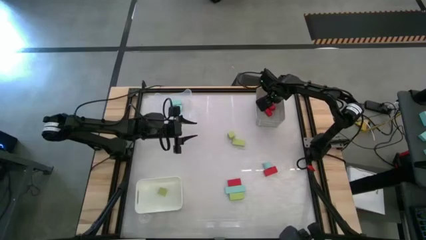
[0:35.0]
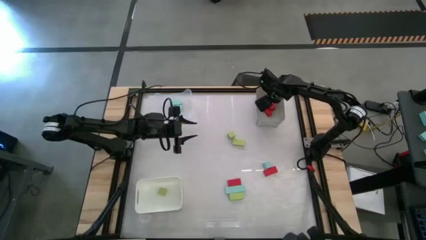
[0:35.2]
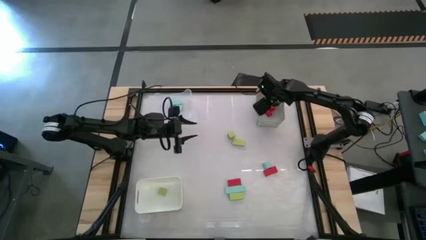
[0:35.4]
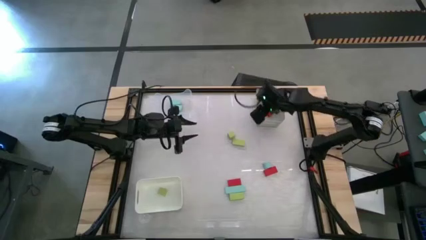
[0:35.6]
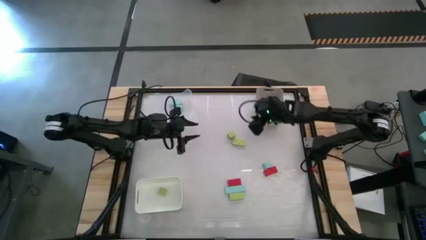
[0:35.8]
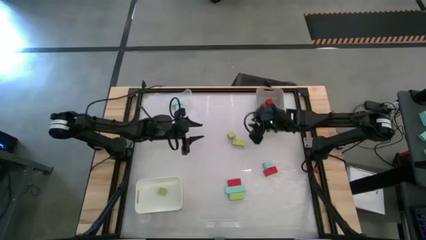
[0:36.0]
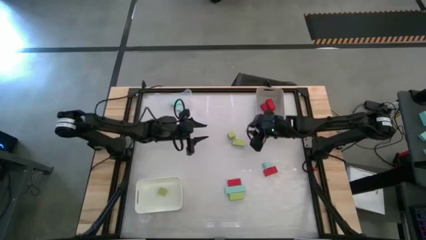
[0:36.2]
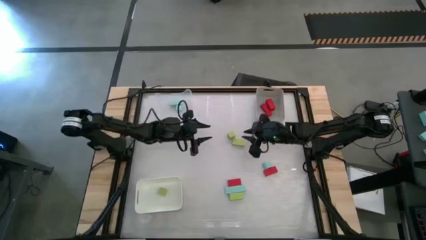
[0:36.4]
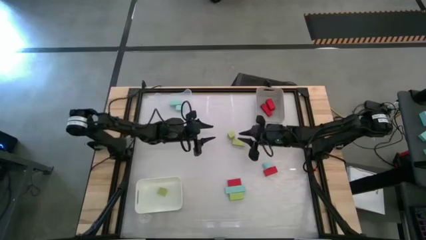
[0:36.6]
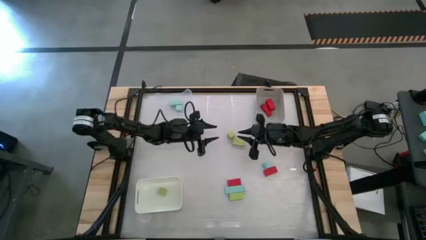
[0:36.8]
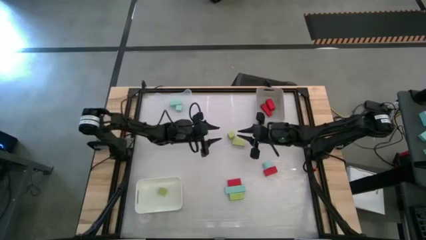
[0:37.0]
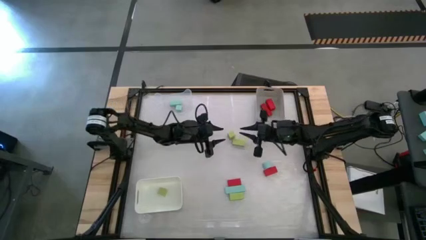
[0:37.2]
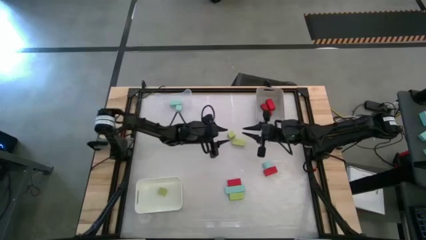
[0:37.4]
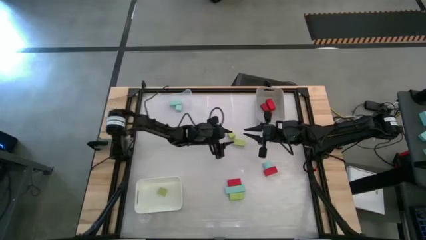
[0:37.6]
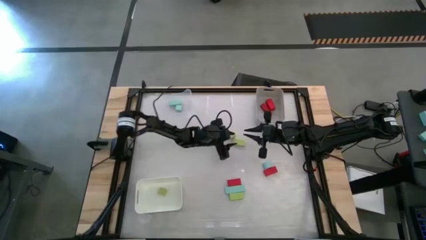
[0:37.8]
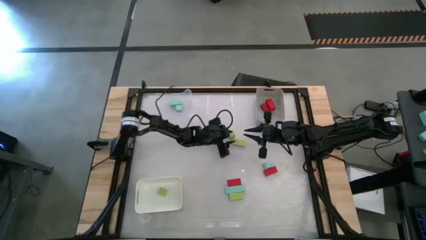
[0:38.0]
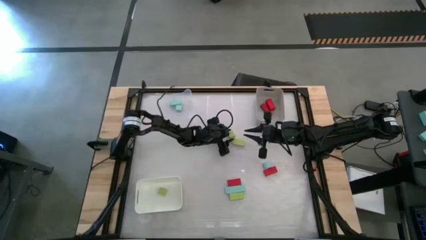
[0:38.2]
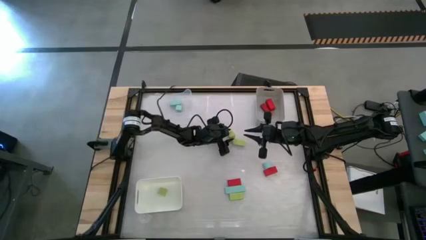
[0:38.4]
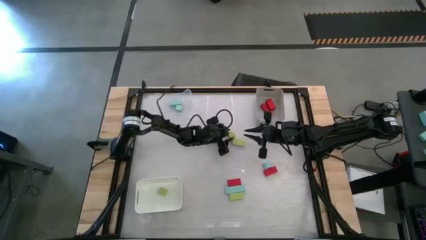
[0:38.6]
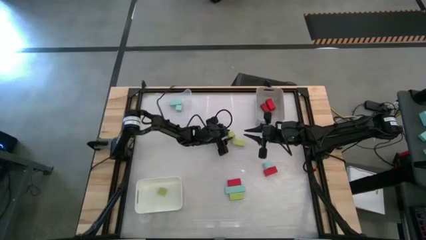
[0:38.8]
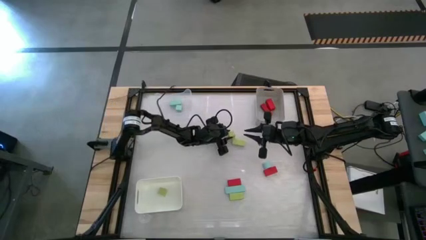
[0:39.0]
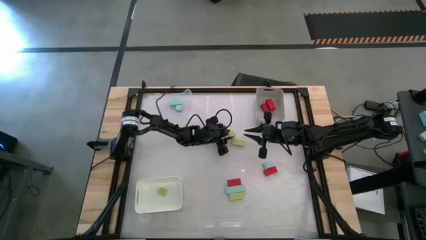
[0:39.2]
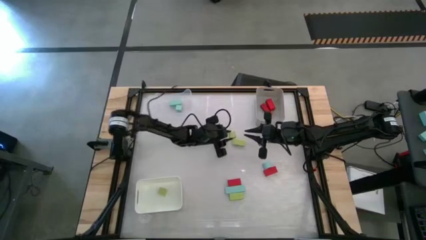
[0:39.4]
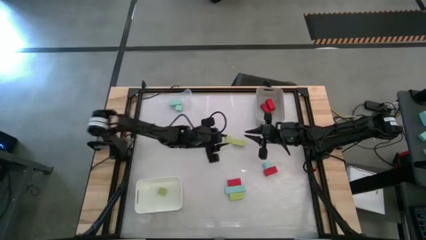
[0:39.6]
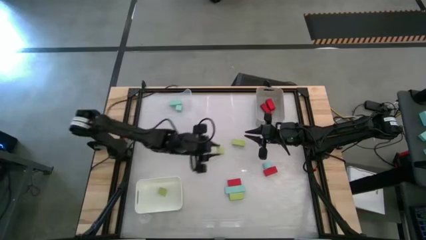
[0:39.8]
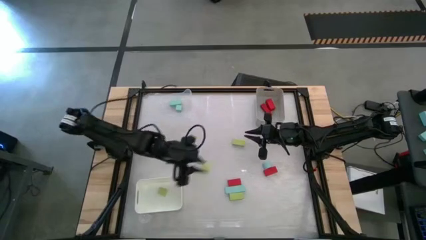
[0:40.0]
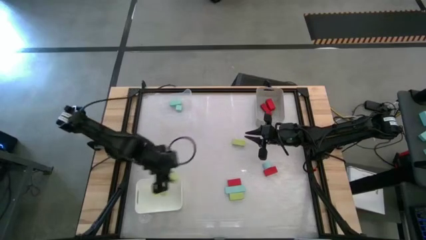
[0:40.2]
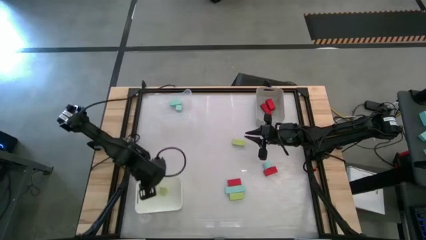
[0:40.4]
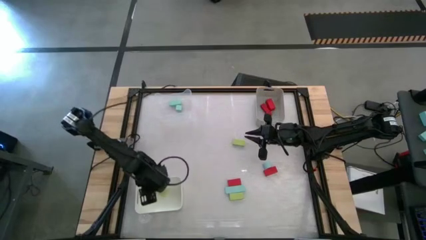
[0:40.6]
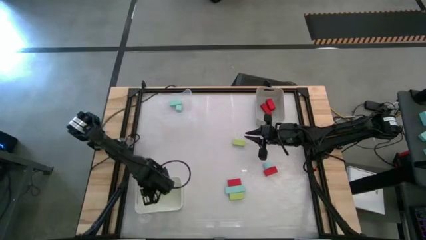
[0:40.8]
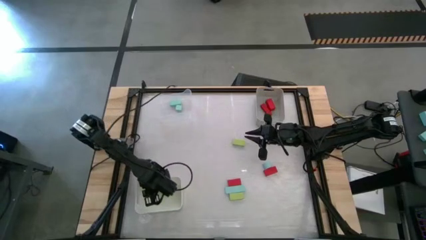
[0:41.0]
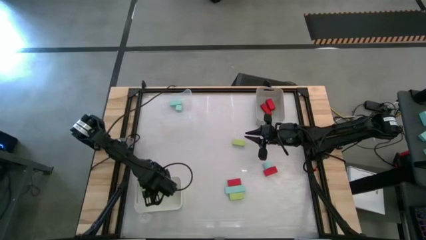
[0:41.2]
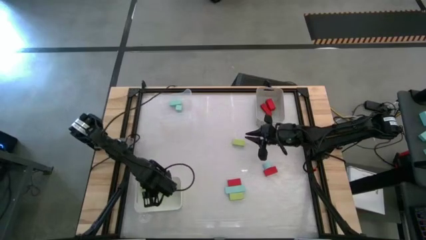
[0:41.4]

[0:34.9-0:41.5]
Task: Sort & place blocks by color
Put the top green block into the white bin

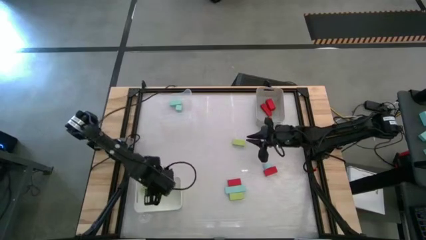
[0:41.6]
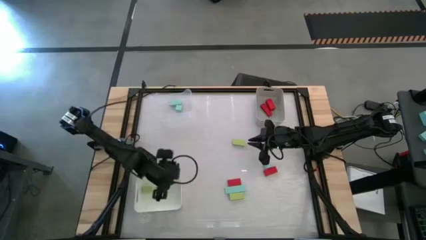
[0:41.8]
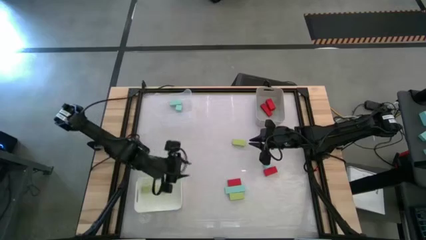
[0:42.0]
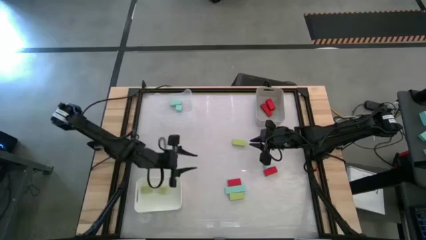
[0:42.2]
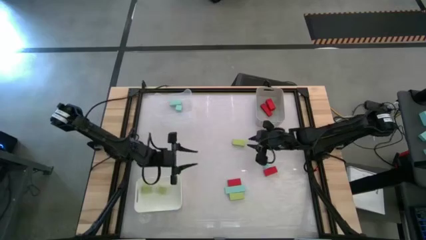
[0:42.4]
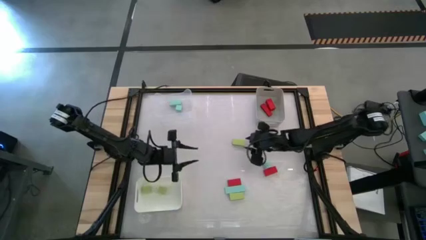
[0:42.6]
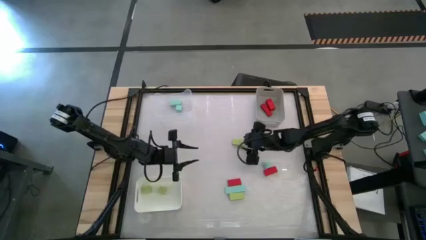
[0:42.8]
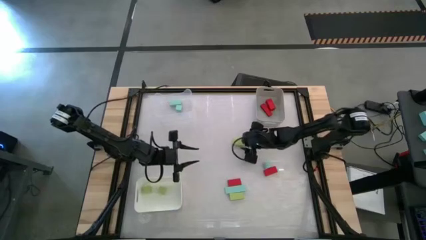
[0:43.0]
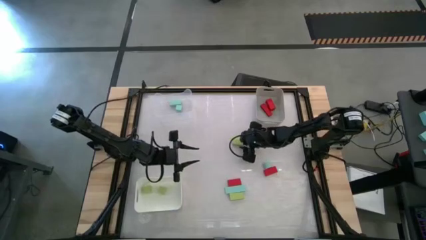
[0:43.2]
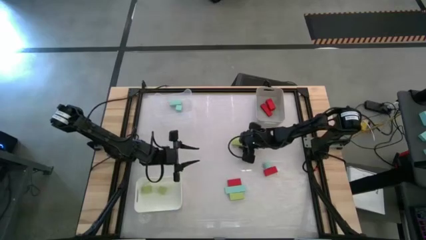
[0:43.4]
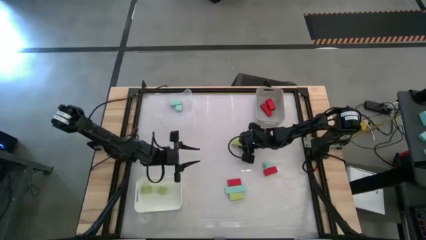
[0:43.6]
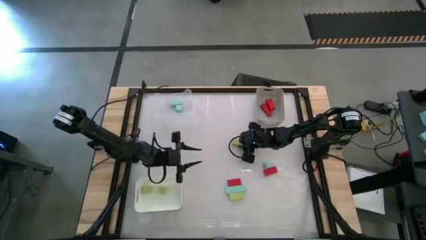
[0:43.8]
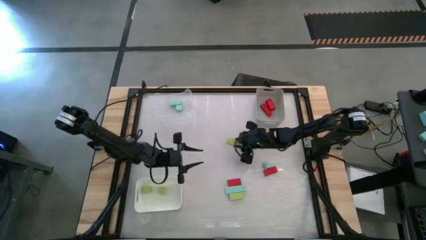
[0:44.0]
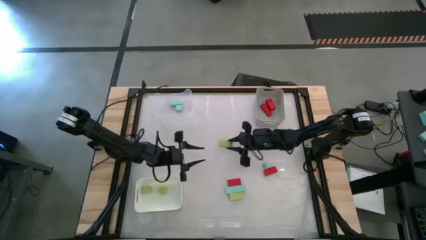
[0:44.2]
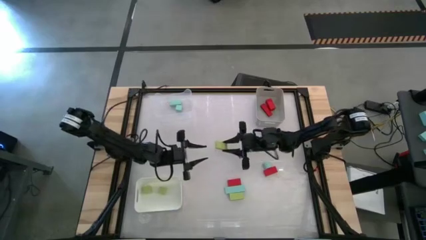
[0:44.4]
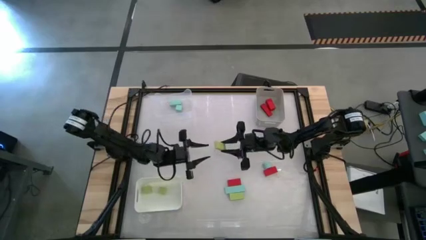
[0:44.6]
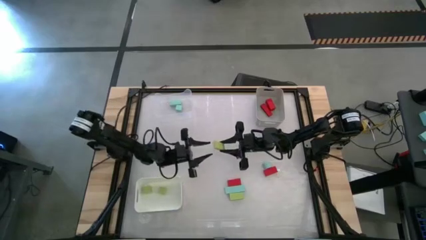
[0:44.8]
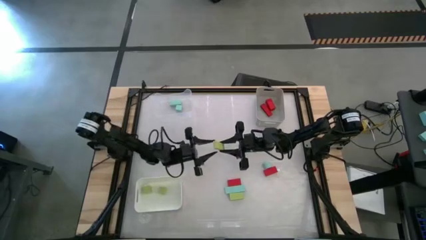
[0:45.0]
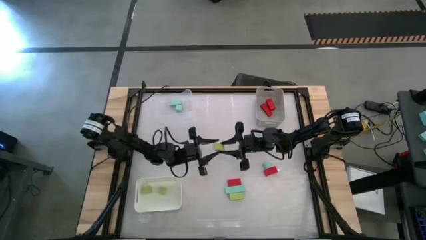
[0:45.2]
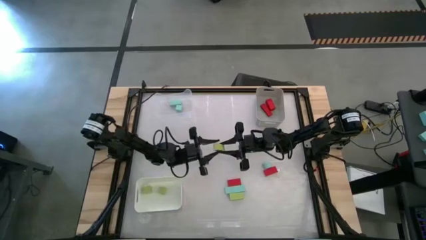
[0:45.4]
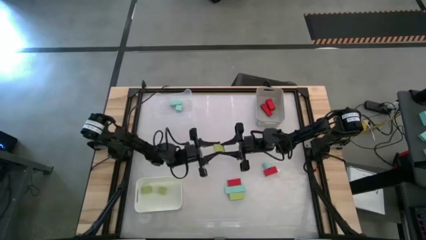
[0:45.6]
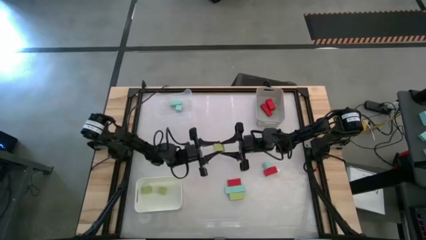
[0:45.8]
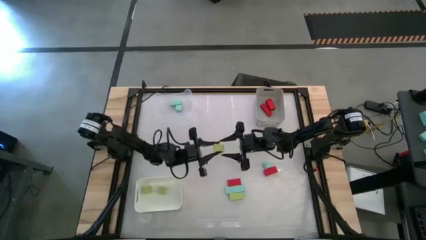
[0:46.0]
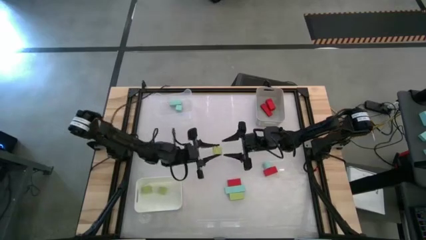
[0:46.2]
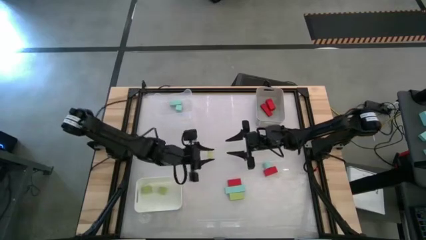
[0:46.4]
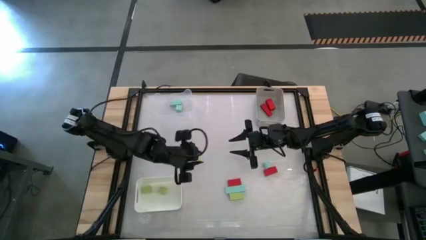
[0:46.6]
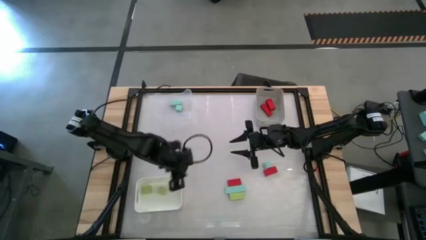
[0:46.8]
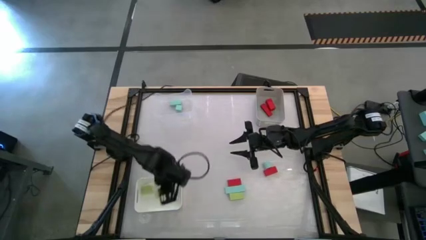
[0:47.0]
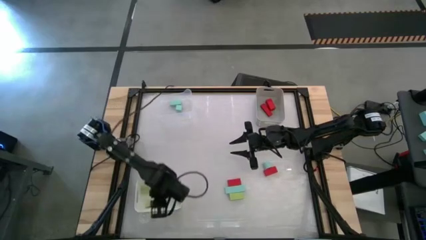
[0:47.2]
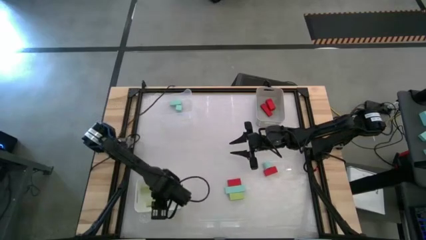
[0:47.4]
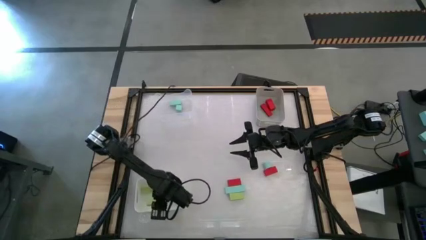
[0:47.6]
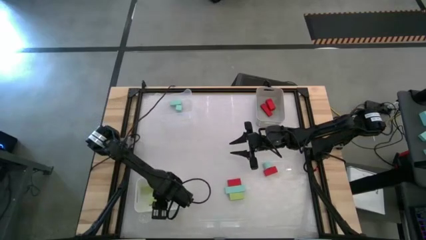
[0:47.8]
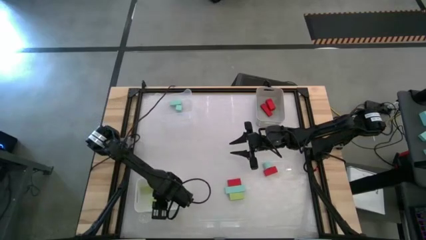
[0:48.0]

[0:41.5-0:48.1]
Put the top green block into the white bin

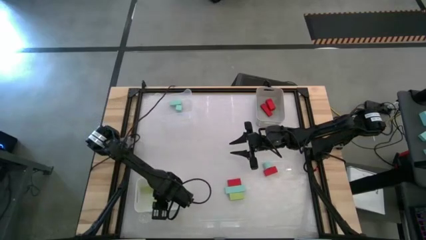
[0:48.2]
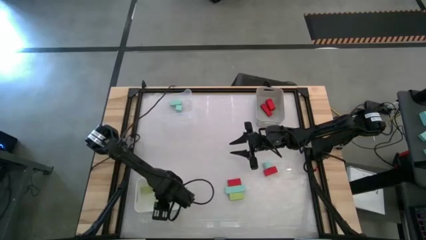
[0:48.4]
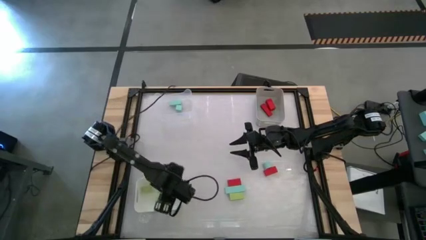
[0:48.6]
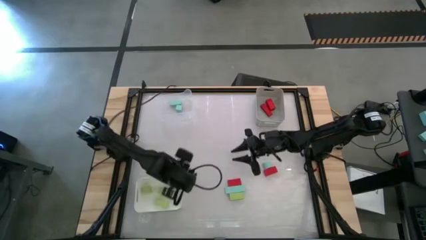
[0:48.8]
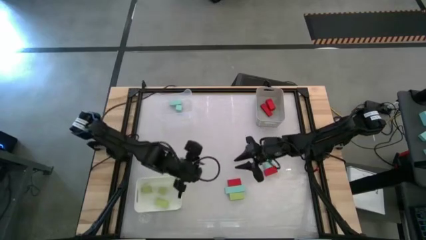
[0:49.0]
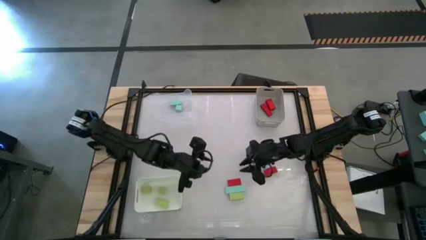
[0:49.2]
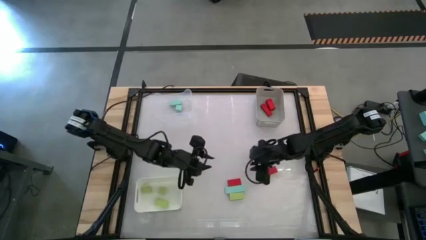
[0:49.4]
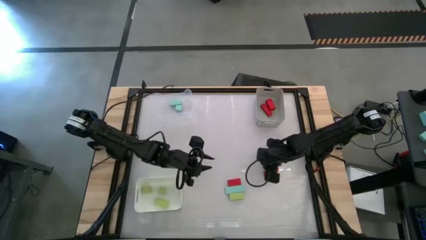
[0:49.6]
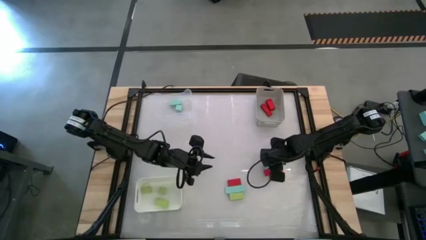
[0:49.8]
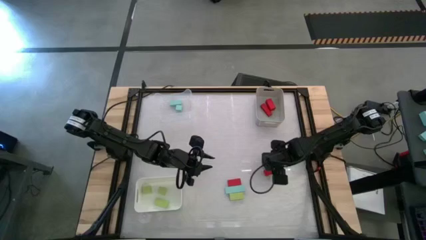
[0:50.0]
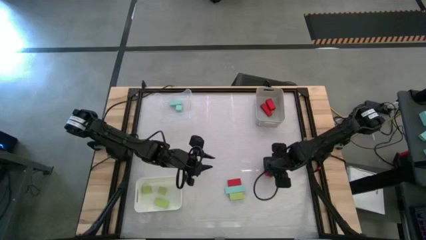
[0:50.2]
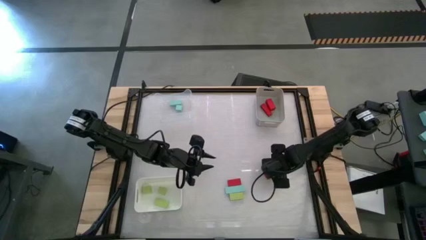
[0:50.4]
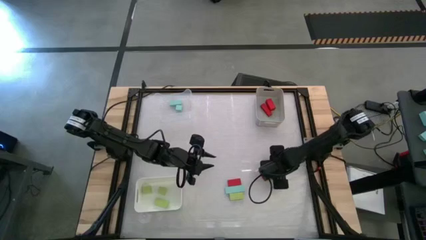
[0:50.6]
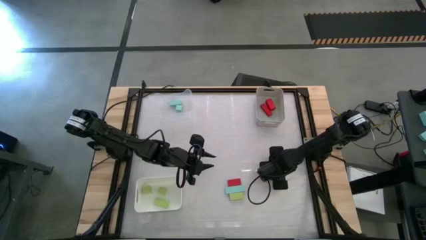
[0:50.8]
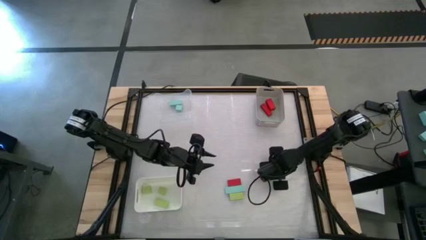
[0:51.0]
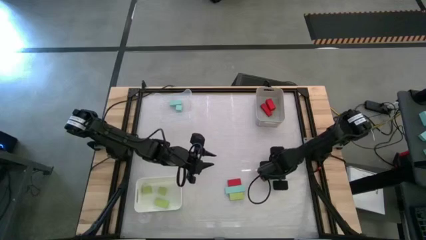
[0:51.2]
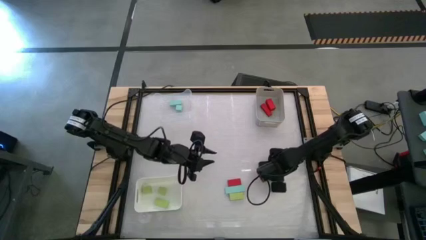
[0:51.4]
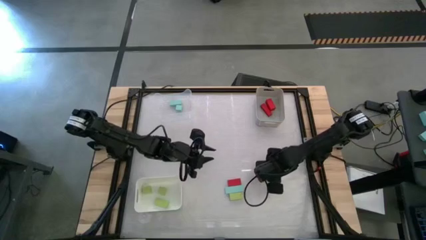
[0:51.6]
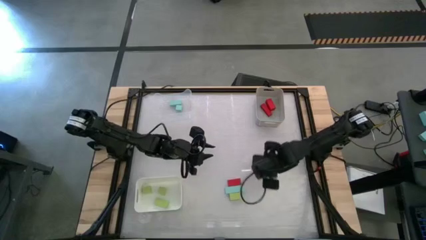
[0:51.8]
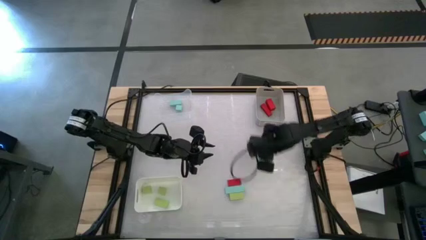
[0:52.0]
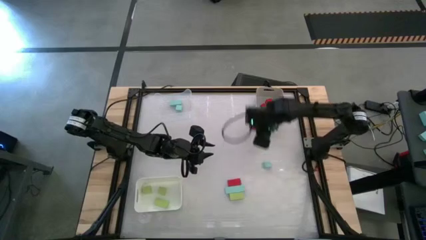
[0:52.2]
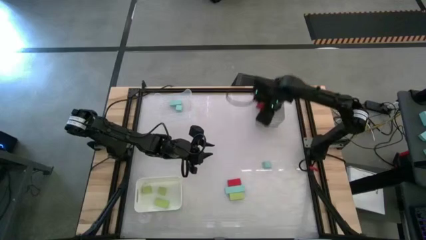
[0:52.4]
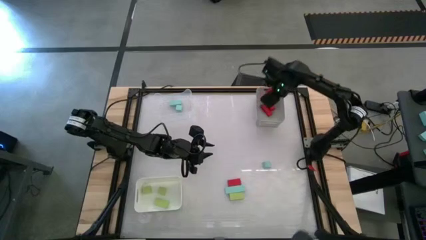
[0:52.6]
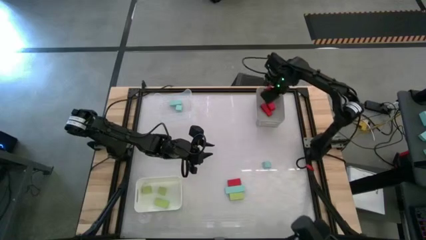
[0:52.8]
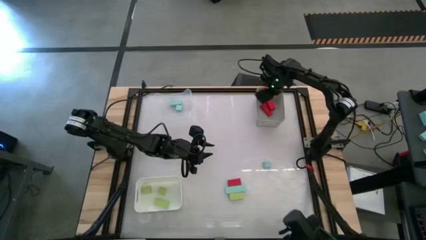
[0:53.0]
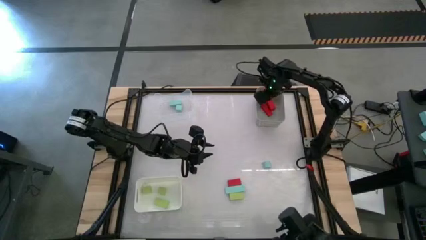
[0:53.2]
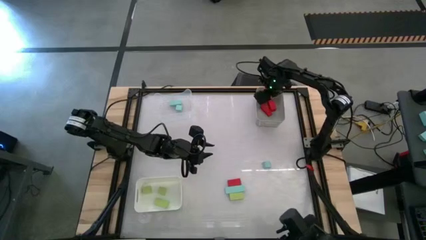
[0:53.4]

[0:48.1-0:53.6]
Put the right red block into the gray bin
